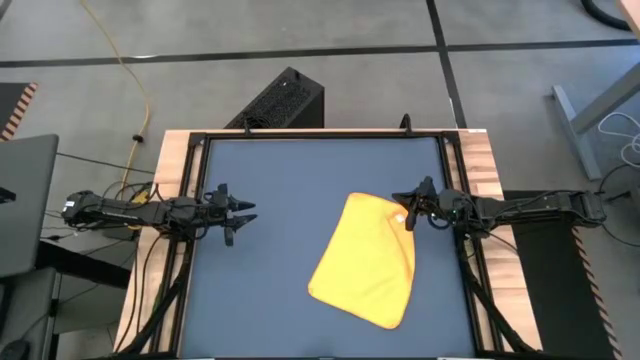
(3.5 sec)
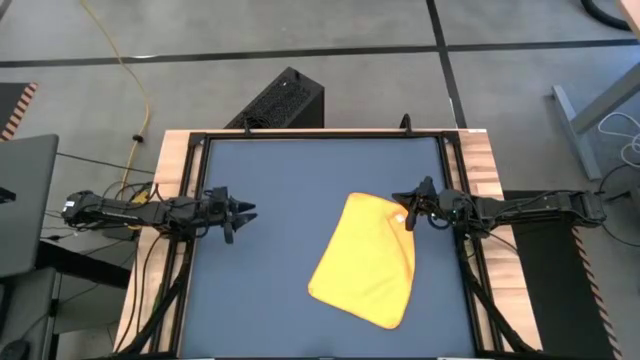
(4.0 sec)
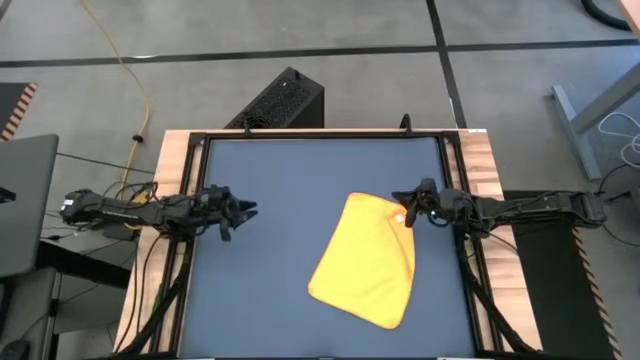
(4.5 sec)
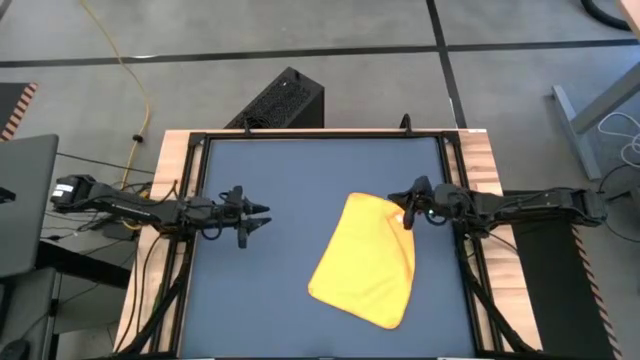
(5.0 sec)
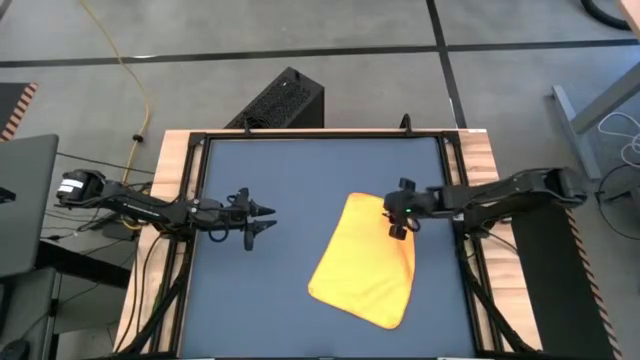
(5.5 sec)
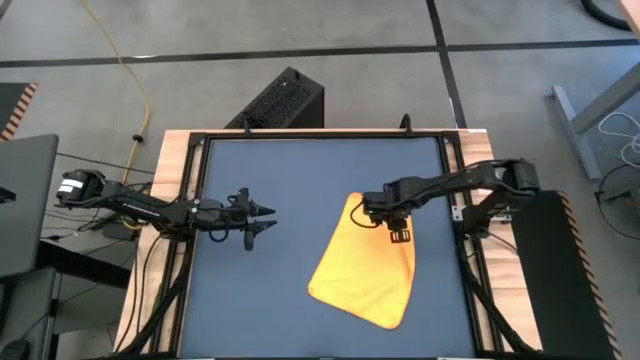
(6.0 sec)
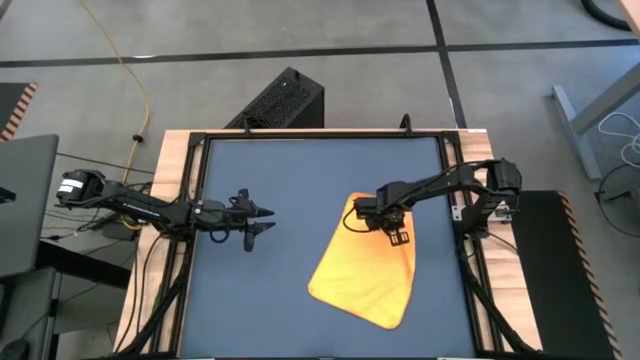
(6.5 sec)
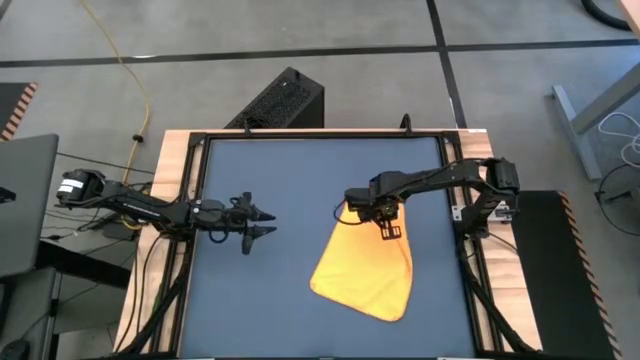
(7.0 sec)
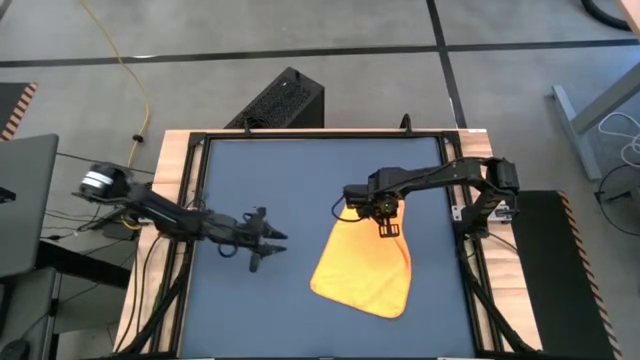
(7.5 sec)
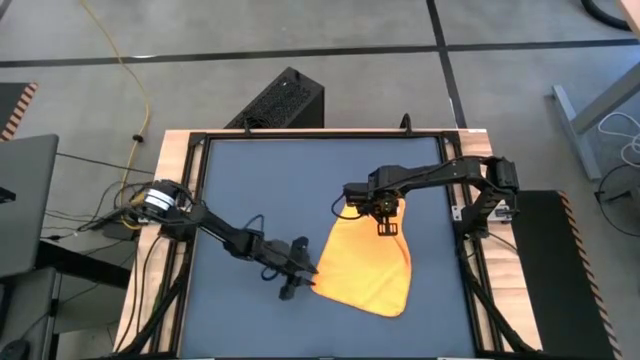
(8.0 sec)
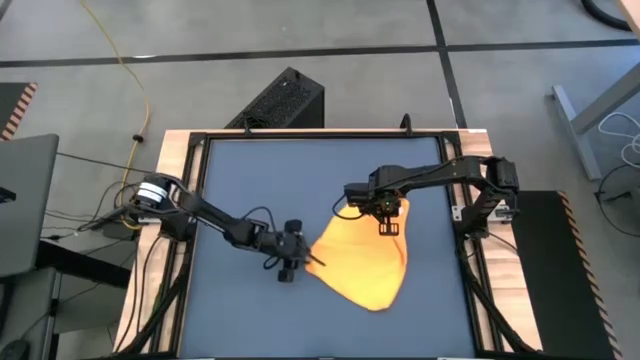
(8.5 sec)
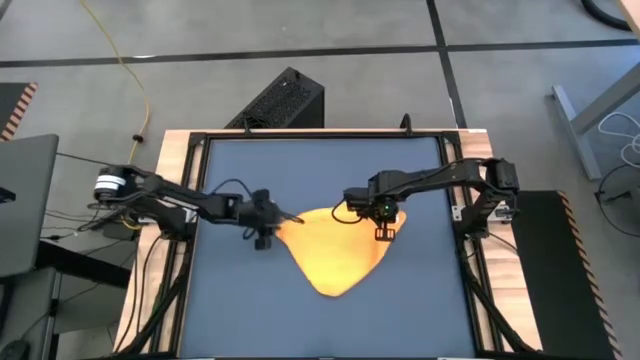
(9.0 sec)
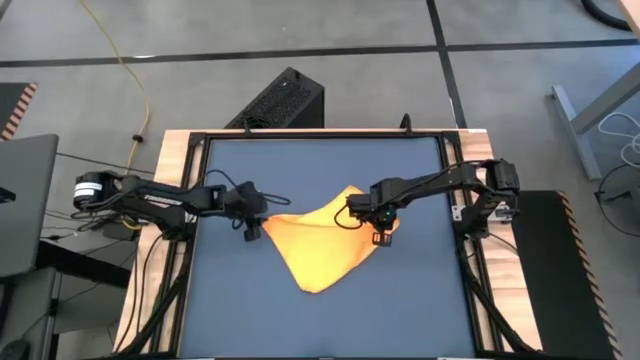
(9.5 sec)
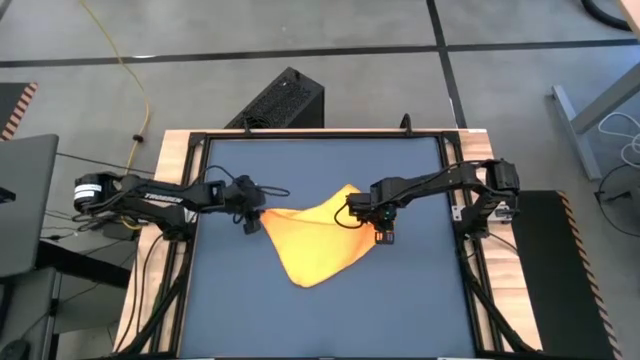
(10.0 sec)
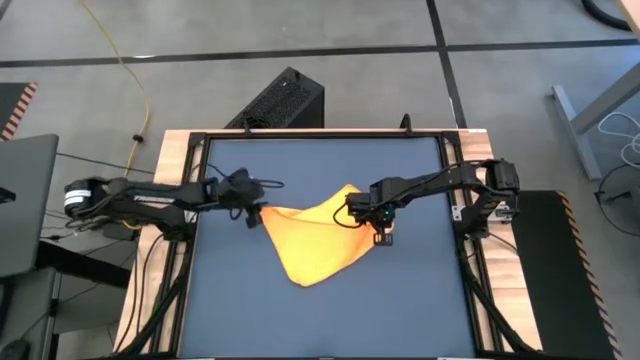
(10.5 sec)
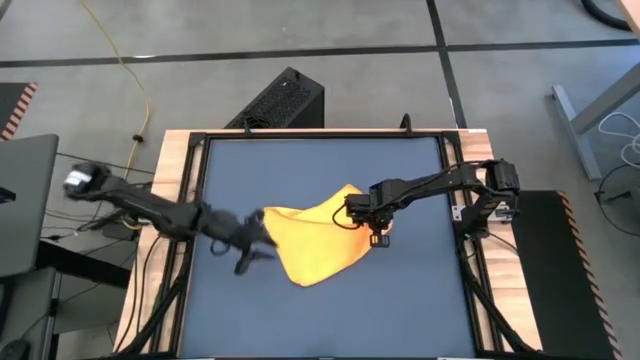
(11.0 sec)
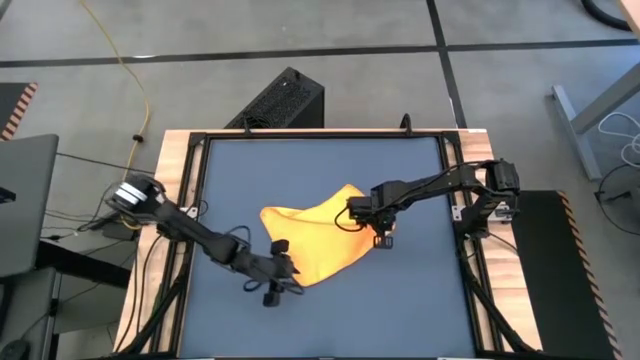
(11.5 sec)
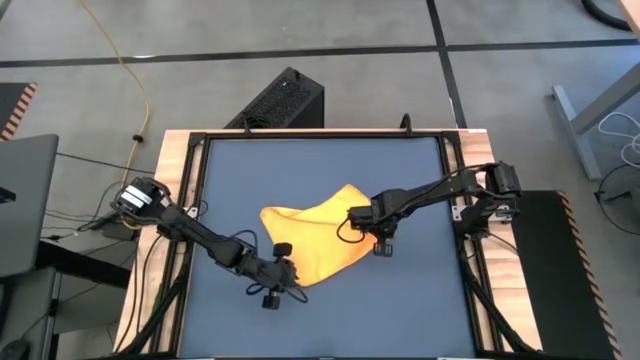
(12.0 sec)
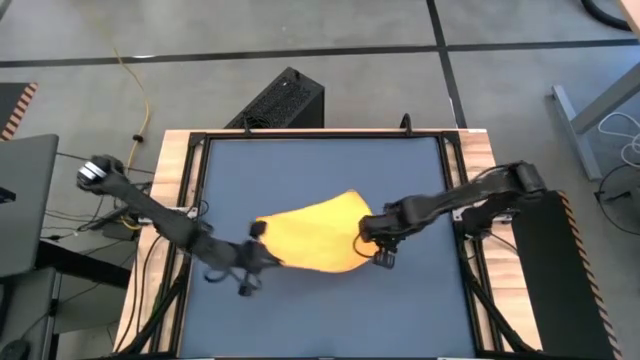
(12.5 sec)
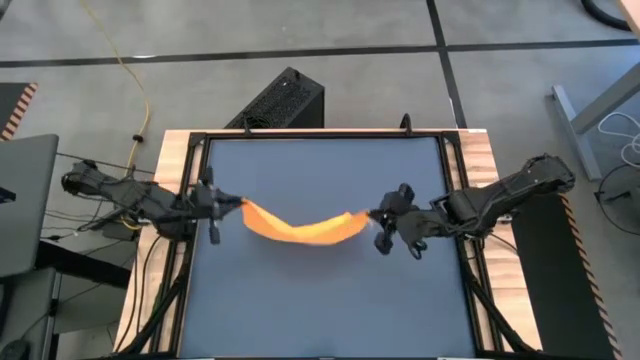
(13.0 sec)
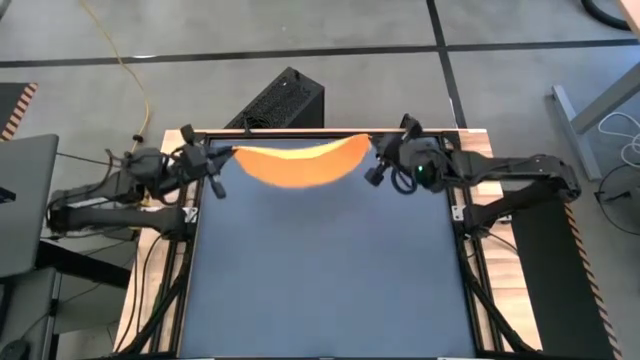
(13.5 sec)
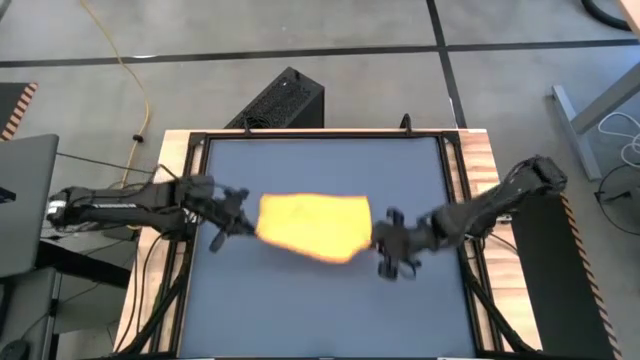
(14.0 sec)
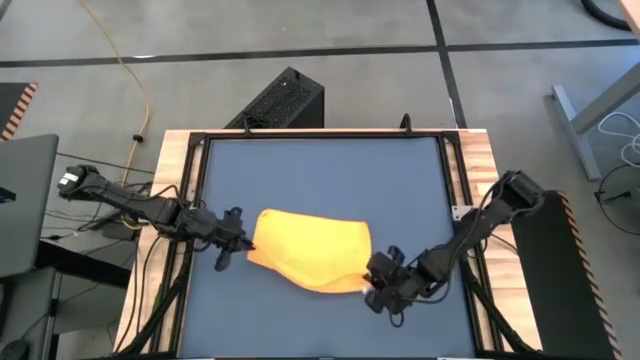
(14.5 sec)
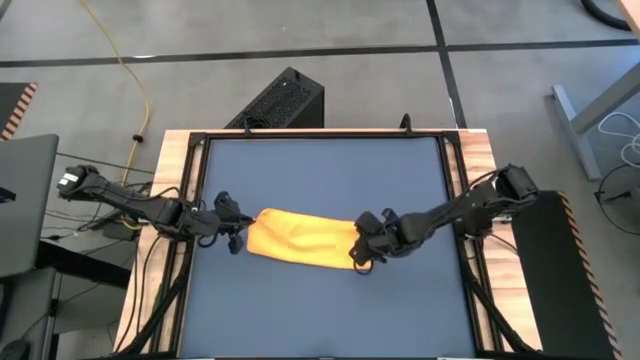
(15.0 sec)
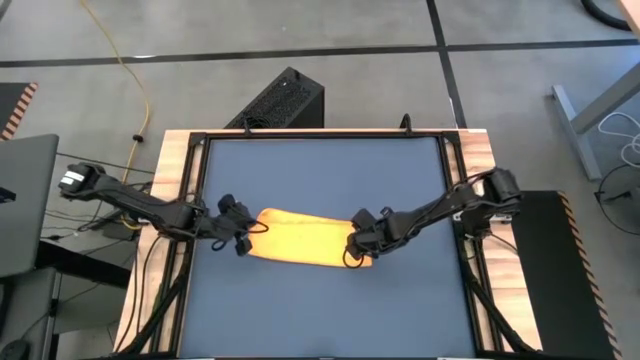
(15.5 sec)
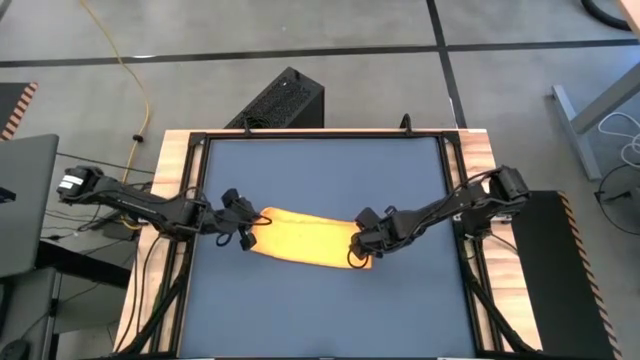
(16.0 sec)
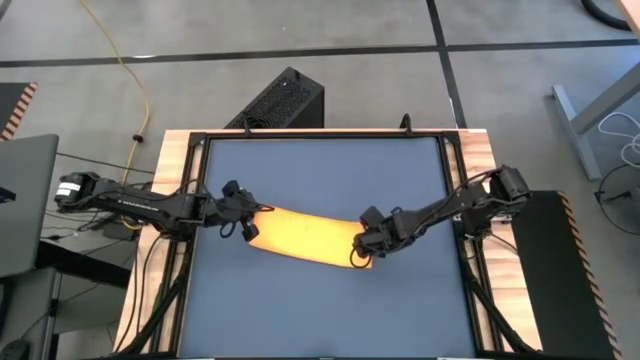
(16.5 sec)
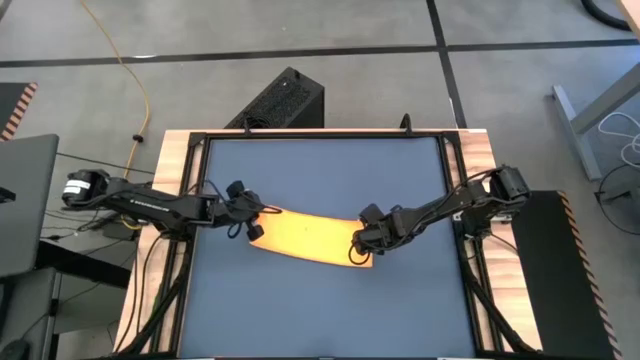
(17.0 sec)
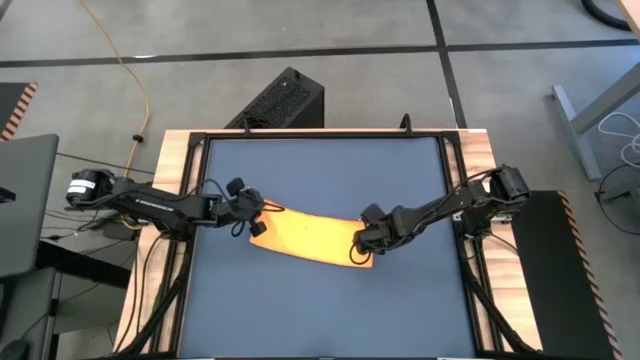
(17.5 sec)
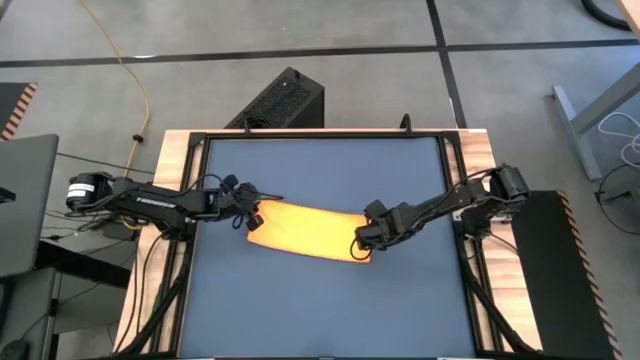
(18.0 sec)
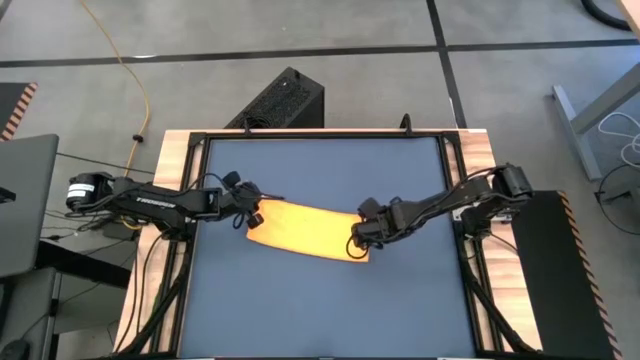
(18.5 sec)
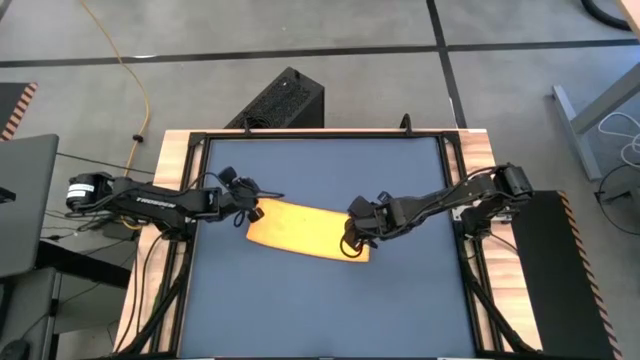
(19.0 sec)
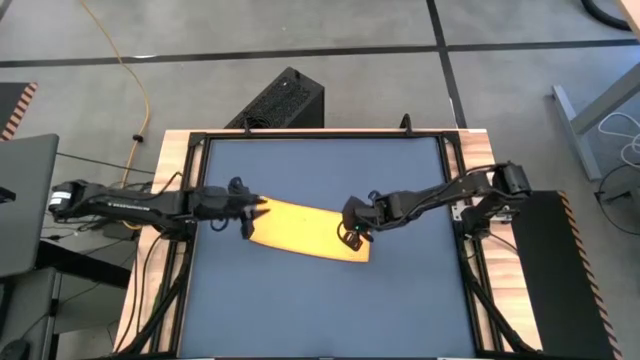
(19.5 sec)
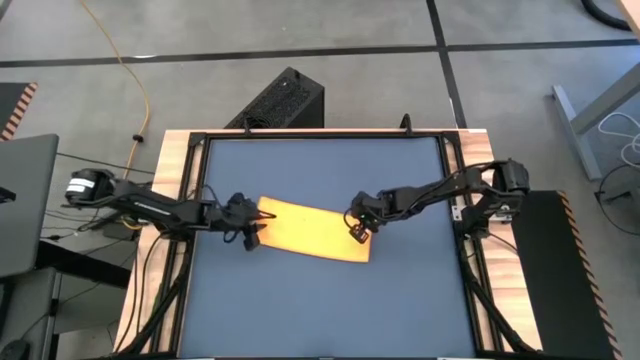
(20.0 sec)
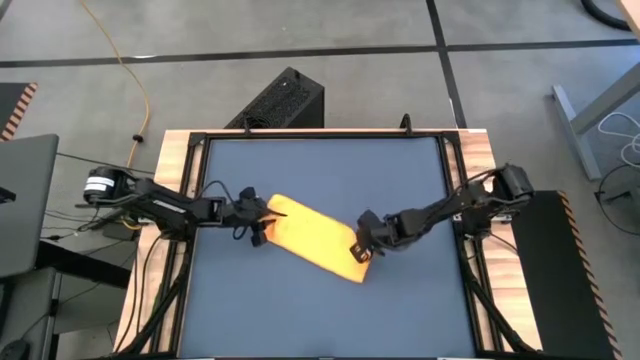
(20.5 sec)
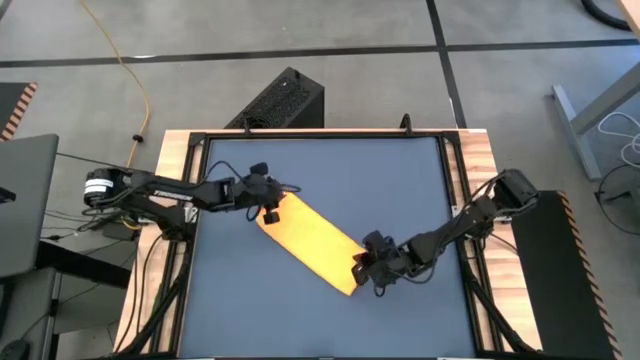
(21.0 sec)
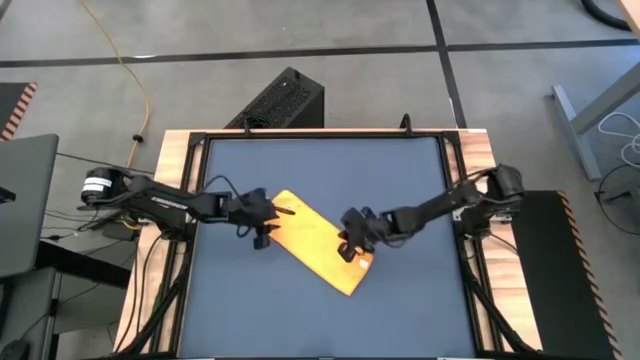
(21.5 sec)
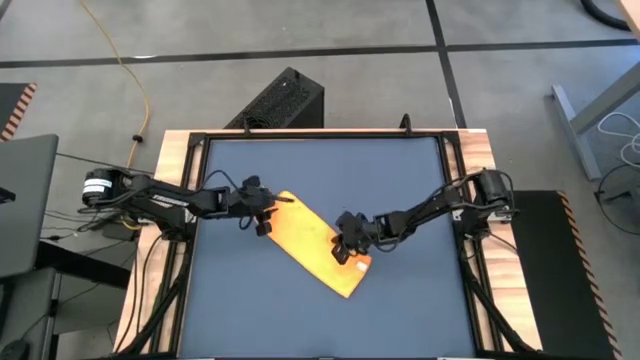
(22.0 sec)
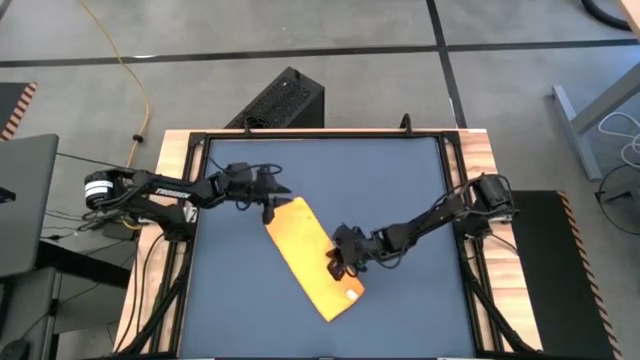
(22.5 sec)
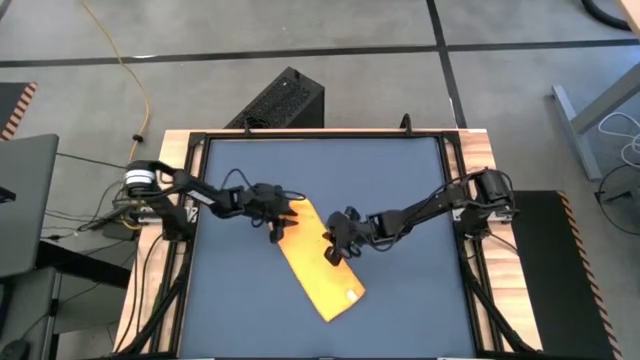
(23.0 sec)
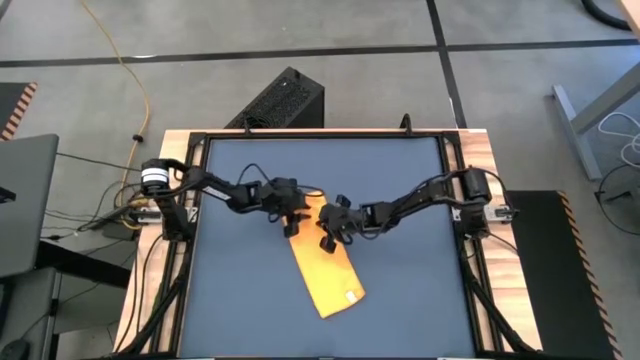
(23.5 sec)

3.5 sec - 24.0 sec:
Task: Roll towel into tight, uniform cylinder
Roll the orange microfiber cloth
